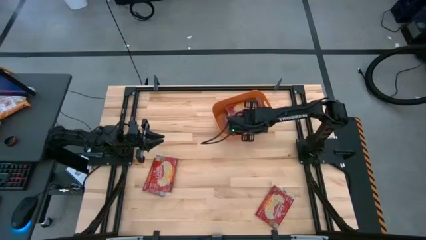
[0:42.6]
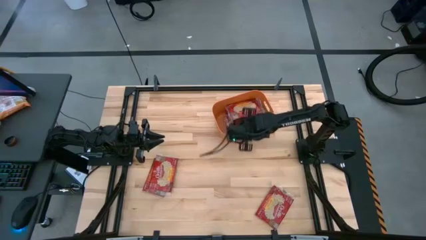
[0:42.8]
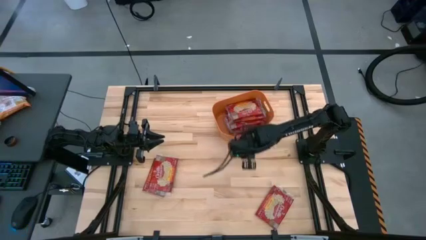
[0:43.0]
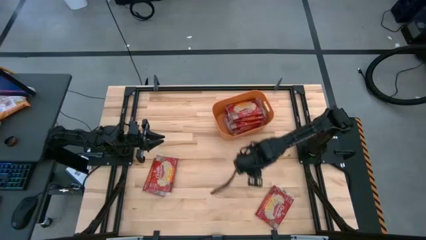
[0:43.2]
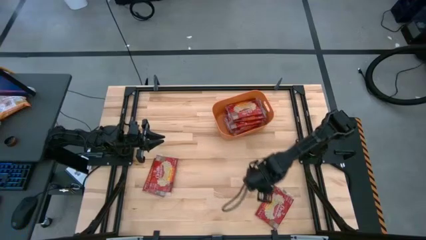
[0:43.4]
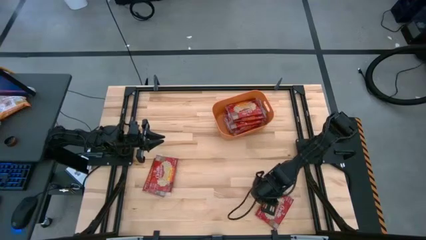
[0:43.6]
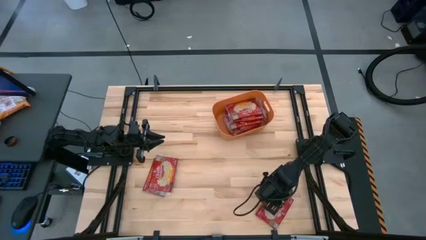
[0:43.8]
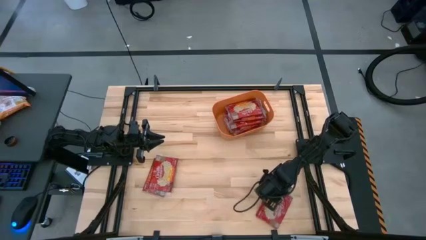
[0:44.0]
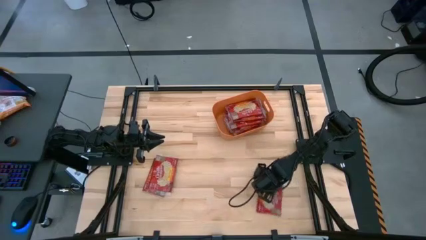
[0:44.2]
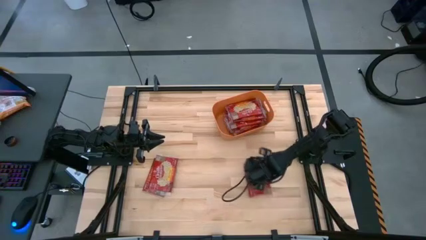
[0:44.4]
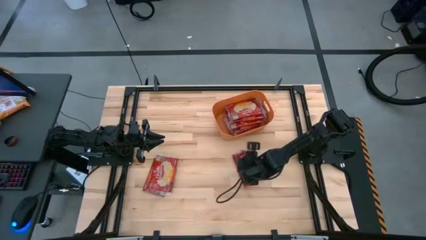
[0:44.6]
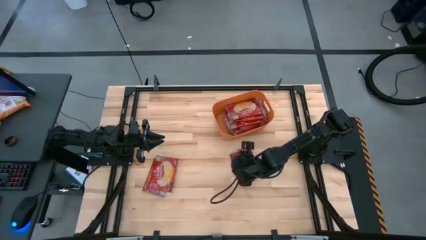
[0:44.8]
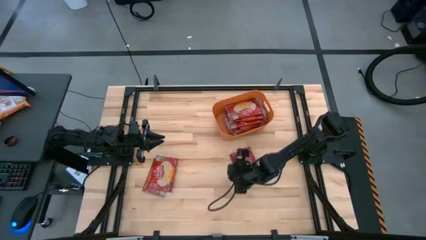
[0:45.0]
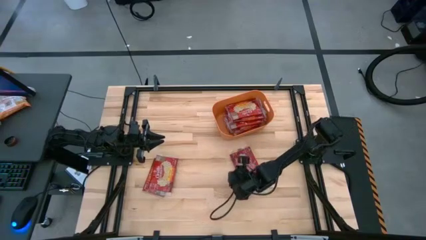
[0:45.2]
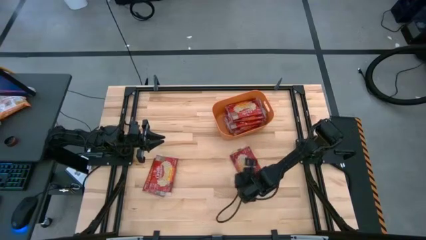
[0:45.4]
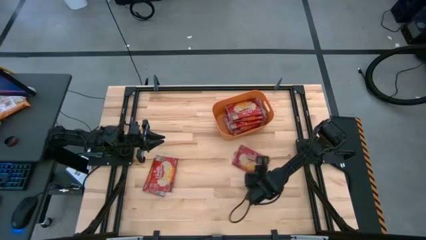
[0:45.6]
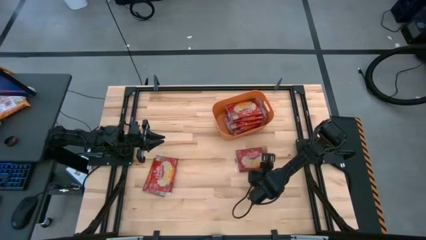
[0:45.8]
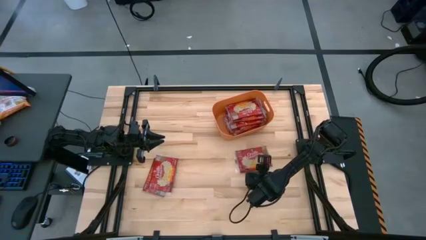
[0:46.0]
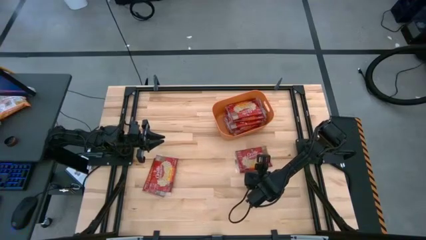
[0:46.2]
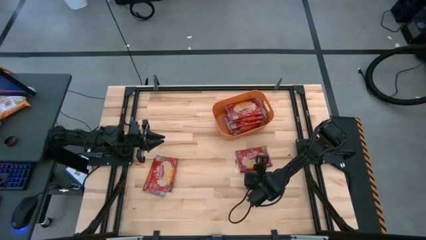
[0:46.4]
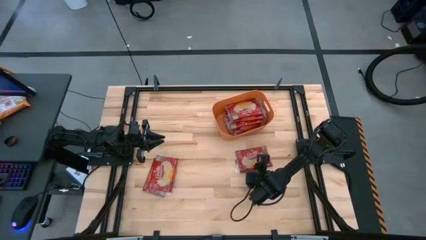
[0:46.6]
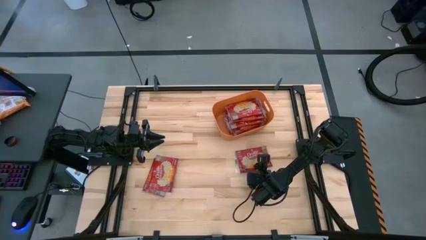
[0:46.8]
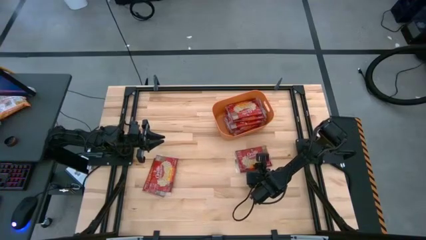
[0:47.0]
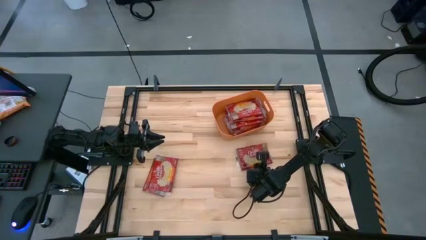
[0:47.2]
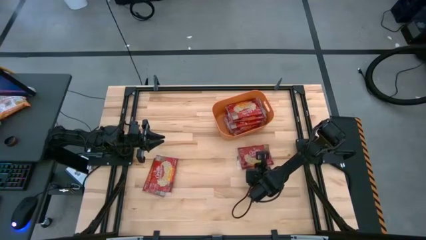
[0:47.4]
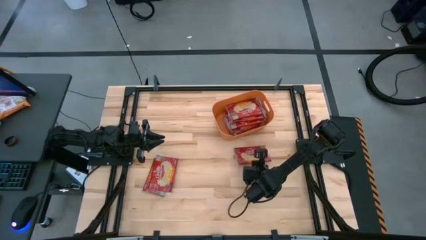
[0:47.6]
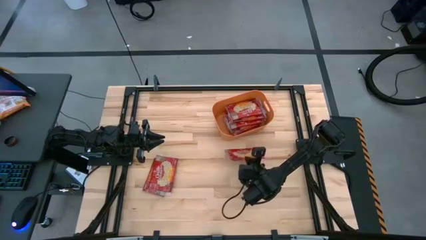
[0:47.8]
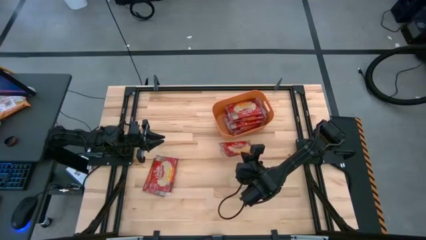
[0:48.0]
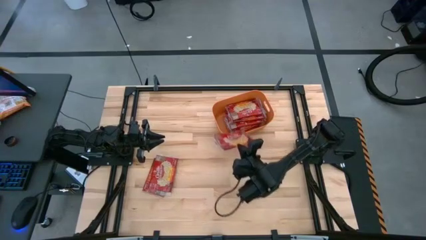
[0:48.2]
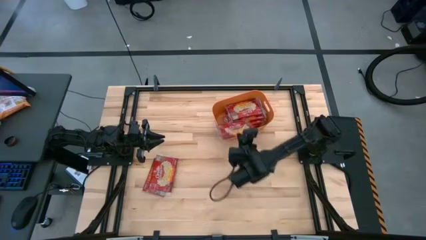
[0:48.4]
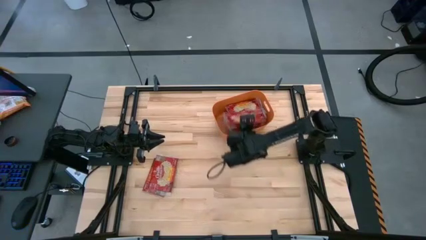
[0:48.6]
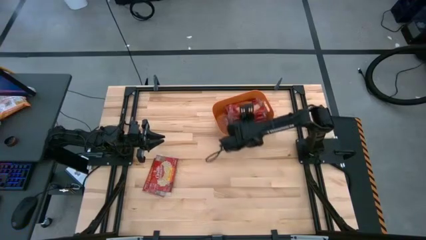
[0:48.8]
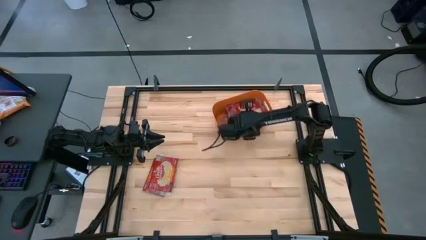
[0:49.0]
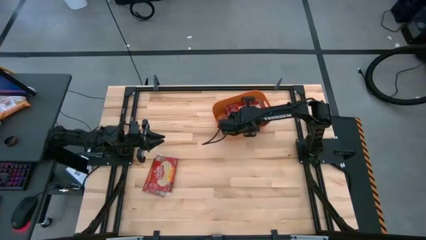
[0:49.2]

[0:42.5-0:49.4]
Task: Sort popcorn bags into baskets
Put the popcorn pack into the orange bin

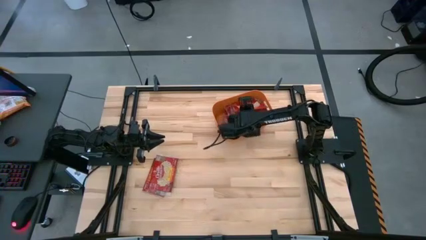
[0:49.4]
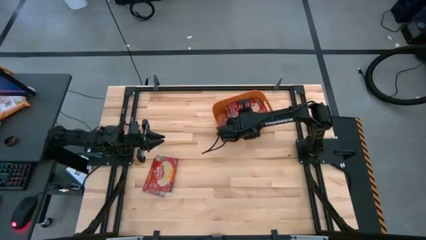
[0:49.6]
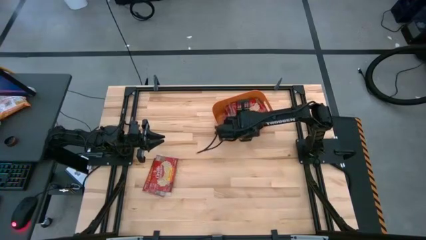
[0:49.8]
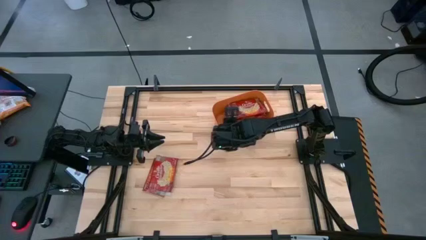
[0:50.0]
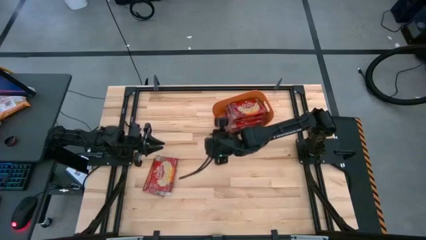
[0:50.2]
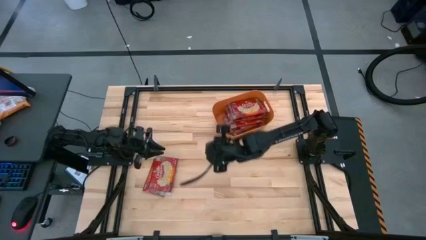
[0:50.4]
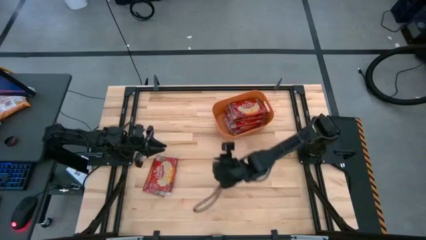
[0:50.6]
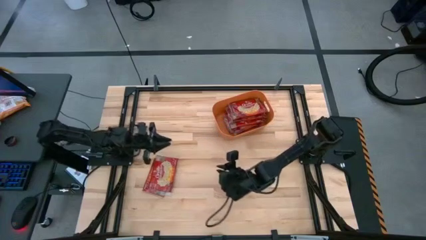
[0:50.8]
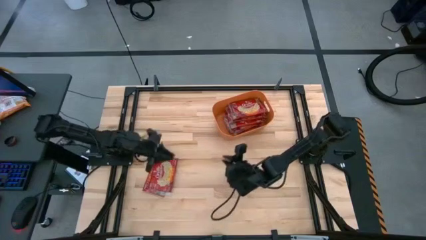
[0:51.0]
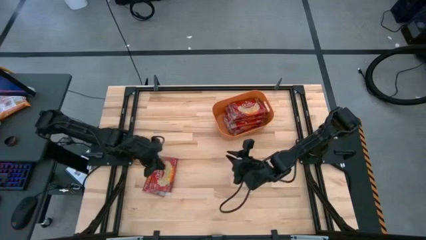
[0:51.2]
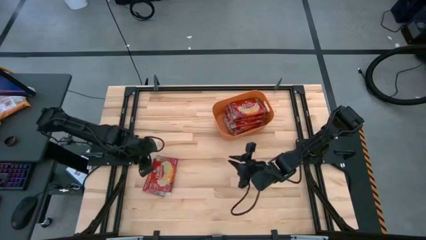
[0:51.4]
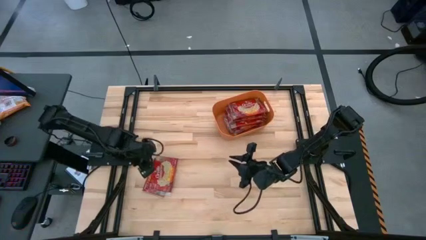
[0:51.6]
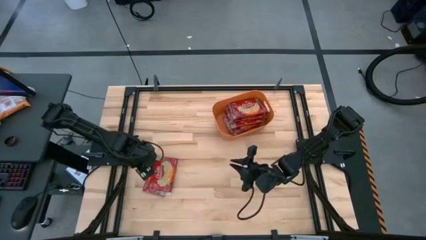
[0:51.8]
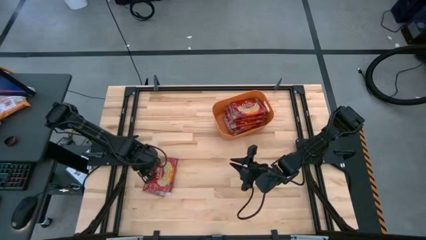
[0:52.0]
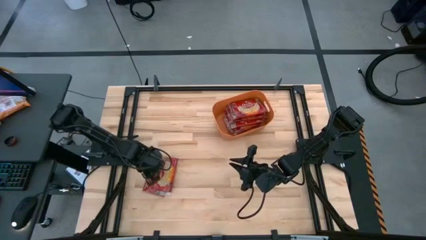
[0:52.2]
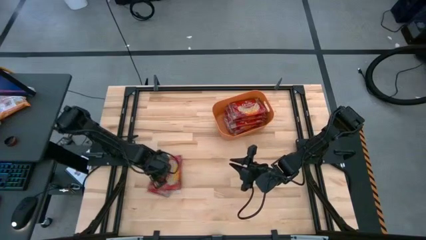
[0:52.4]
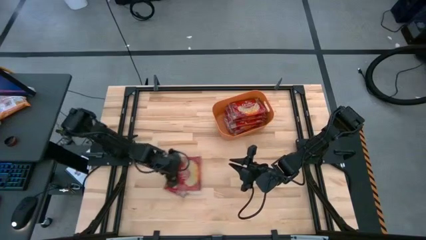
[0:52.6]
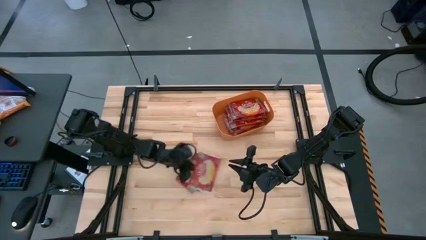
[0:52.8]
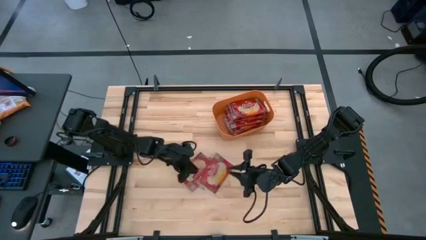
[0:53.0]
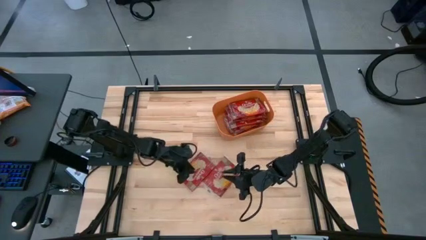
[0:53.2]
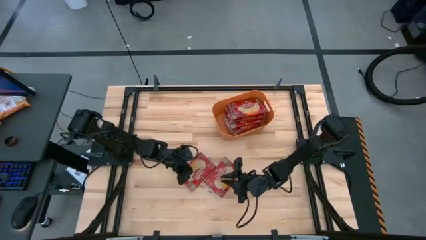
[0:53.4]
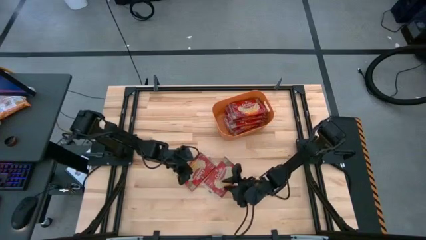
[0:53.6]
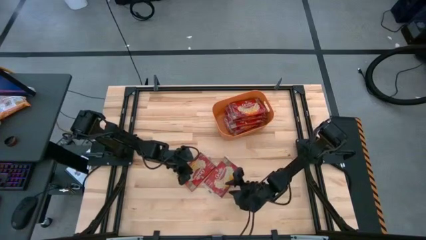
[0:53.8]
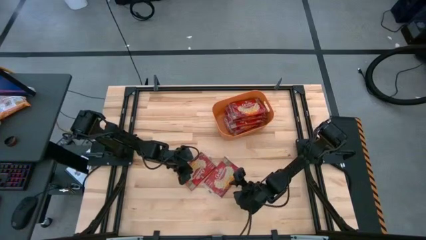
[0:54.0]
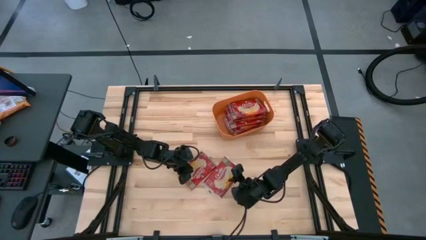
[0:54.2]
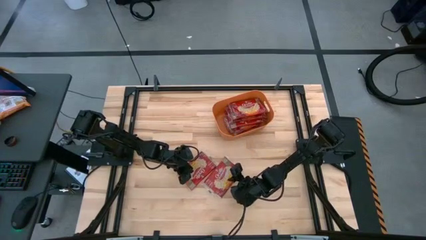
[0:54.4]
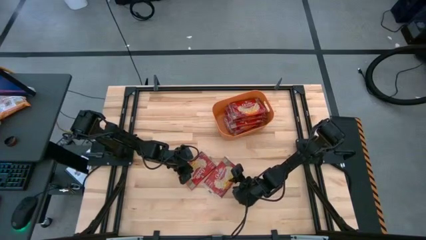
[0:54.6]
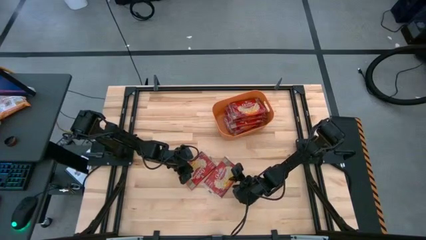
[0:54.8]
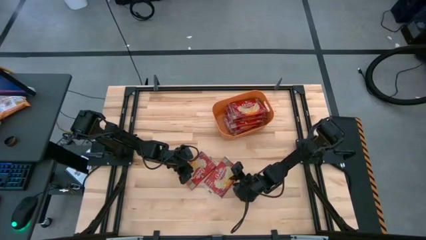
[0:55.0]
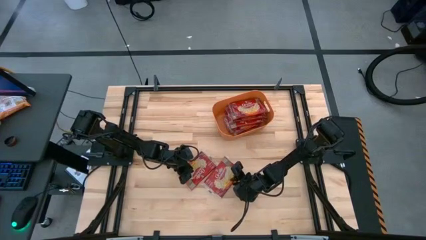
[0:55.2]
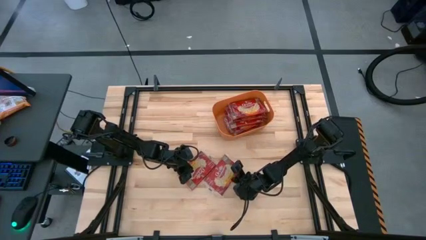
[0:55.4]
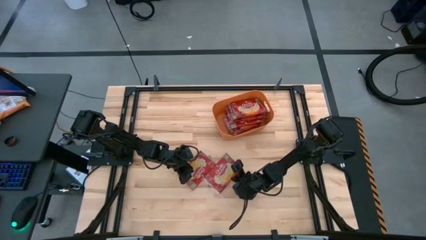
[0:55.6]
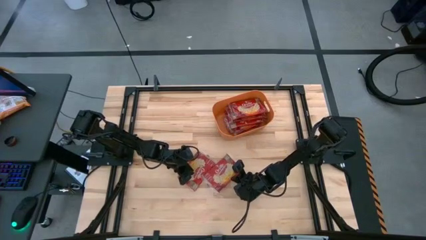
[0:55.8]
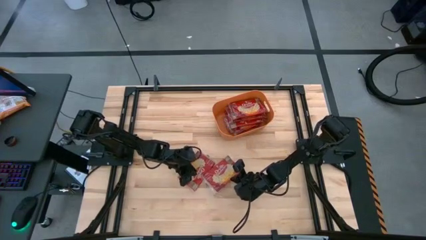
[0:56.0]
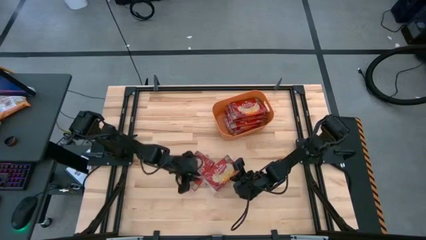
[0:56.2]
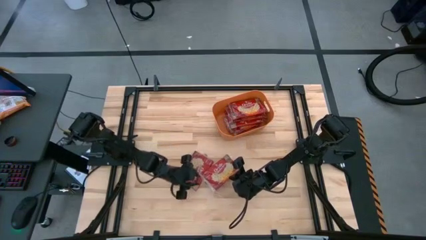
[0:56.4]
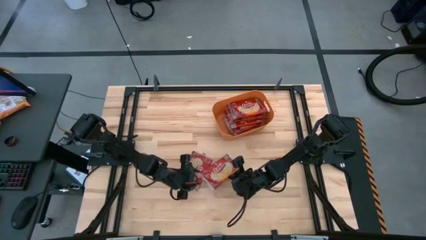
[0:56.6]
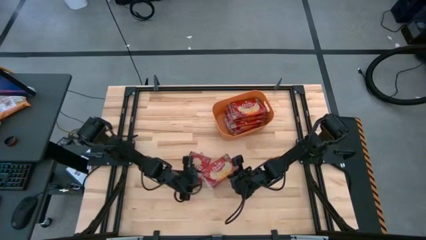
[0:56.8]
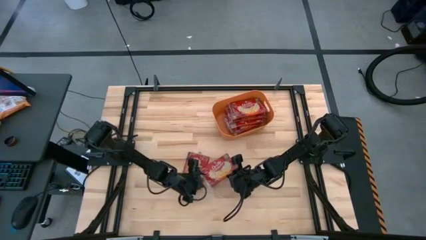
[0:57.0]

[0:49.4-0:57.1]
Put the popcorn pack into the orange bin
